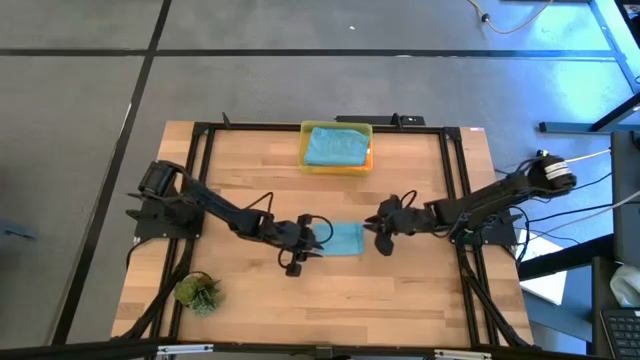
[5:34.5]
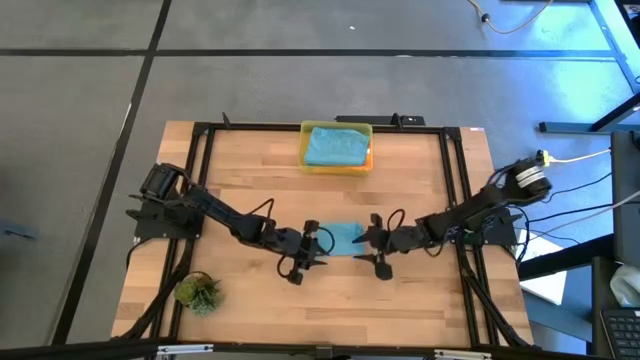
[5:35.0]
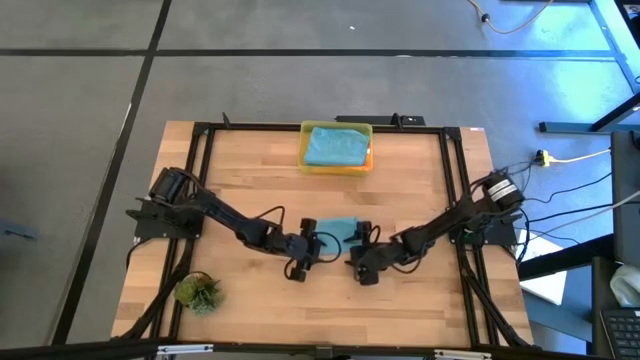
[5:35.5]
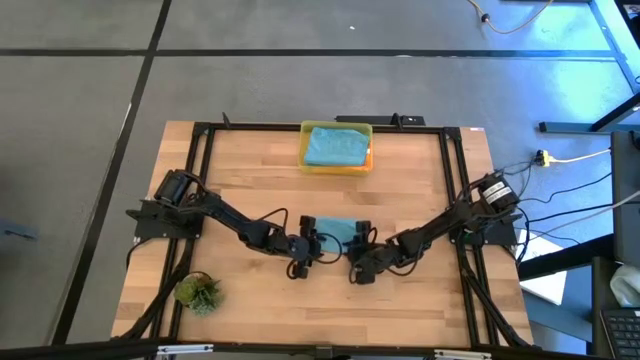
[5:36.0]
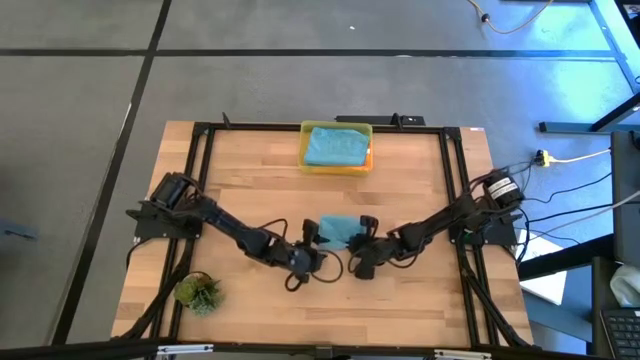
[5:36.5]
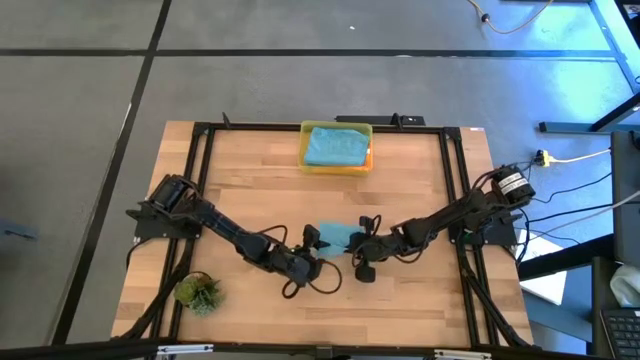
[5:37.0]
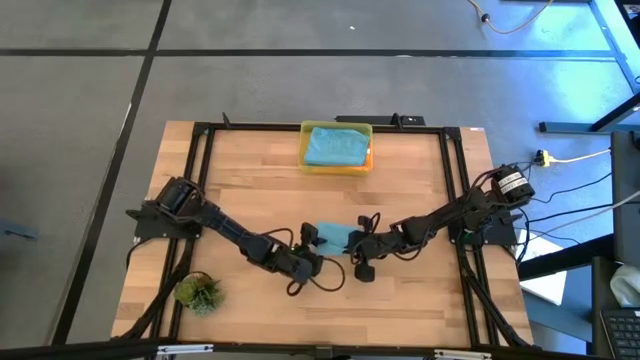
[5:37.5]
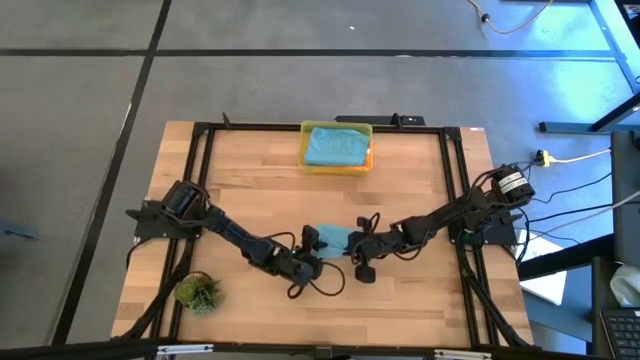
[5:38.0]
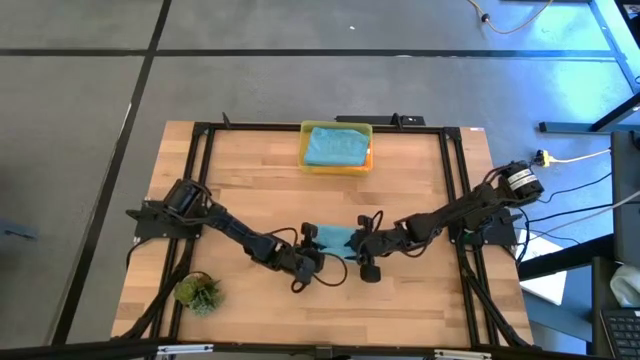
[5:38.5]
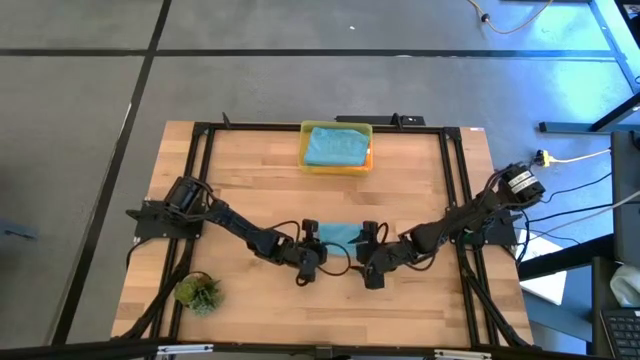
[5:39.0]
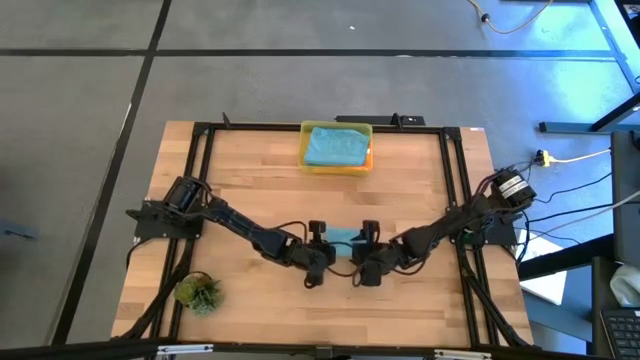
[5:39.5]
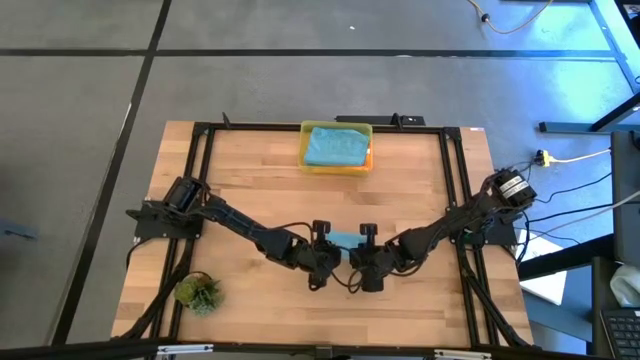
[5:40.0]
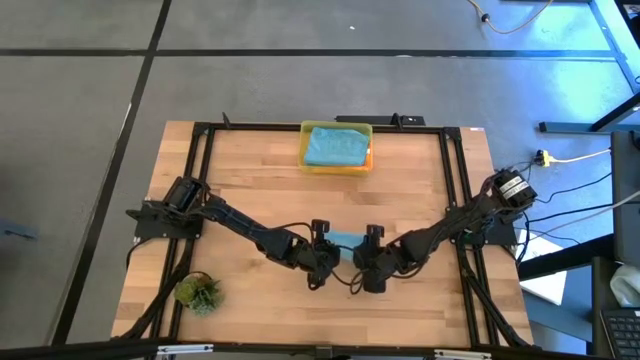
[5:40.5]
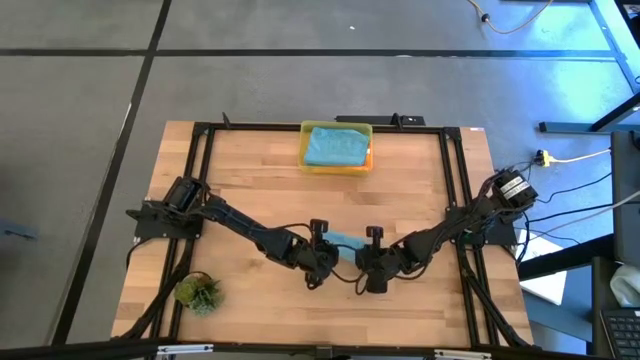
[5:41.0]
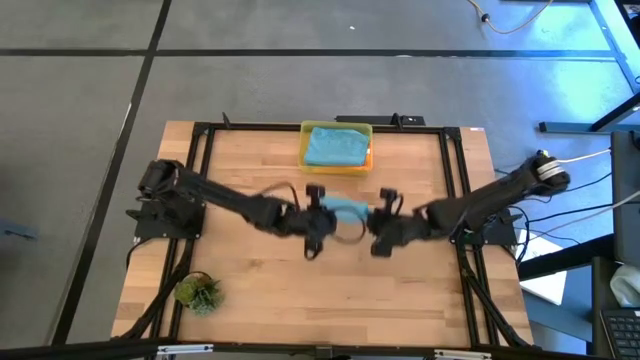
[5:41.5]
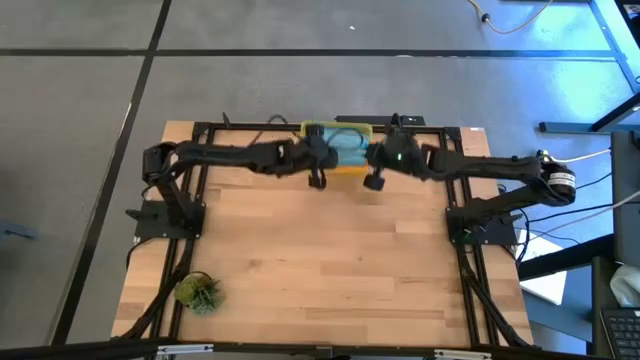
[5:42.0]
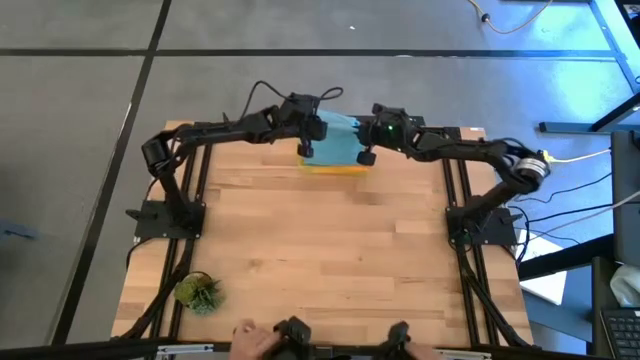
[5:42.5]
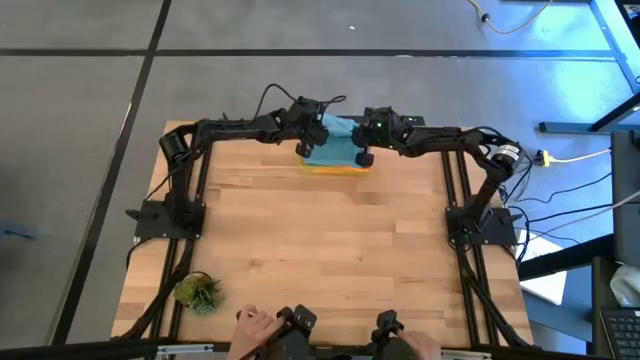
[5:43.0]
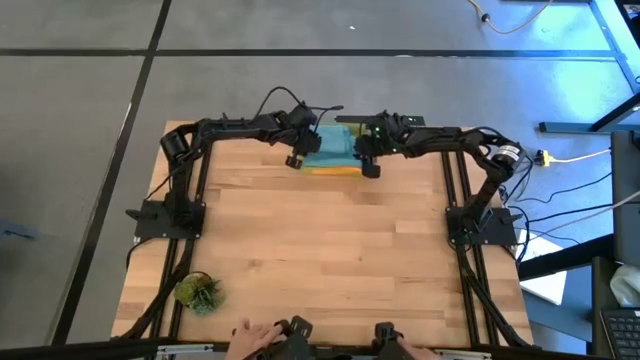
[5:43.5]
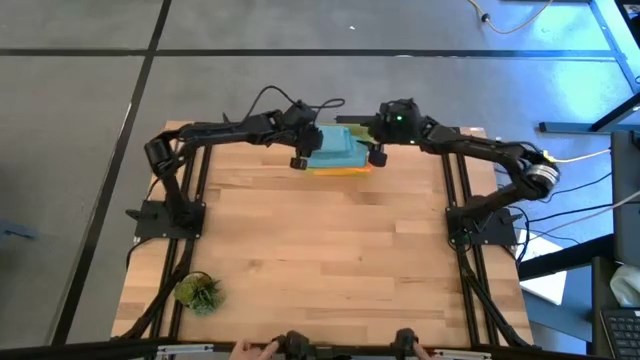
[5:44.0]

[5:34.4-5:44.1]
Task: Fold microfiber towels
Put the blue microfiber cloth into the yellow bin

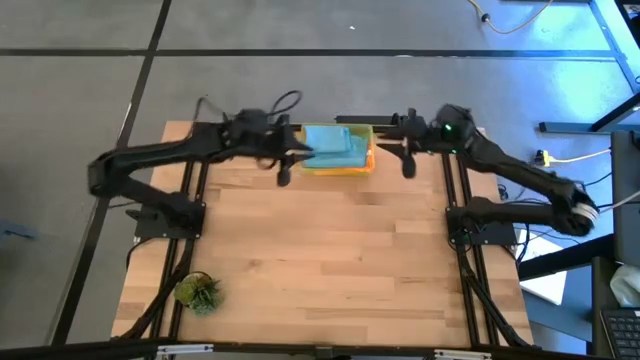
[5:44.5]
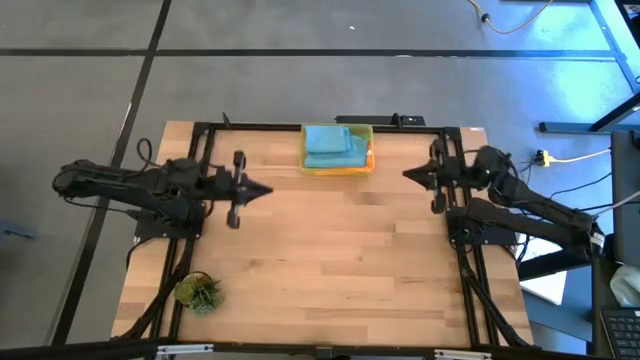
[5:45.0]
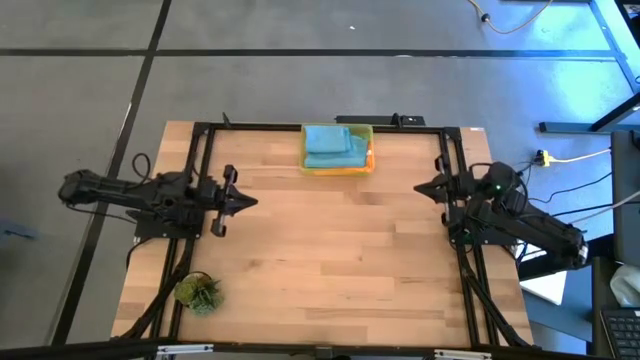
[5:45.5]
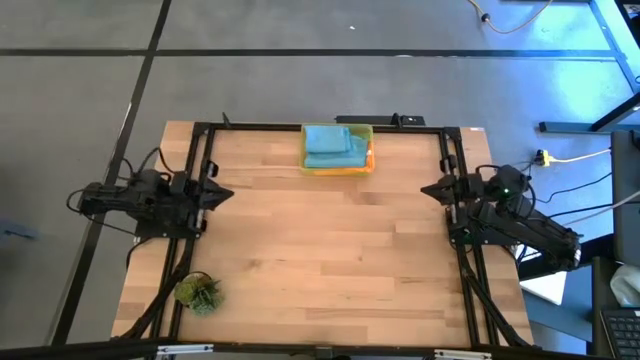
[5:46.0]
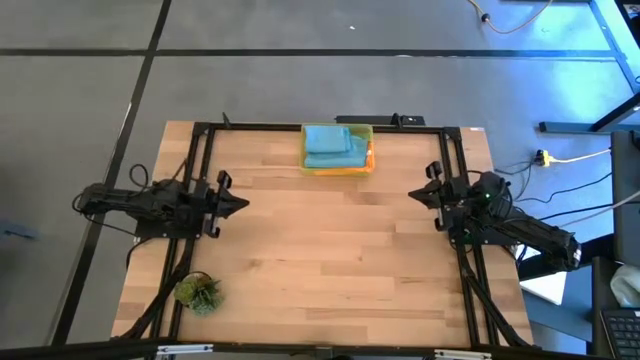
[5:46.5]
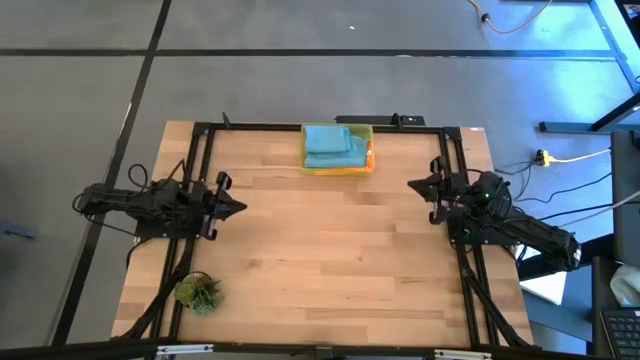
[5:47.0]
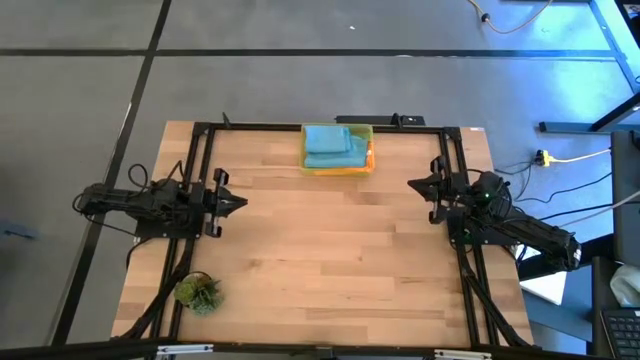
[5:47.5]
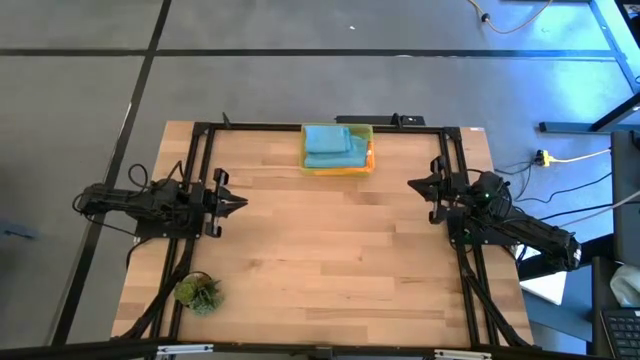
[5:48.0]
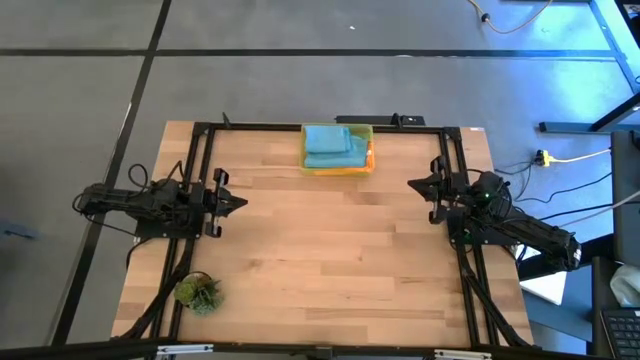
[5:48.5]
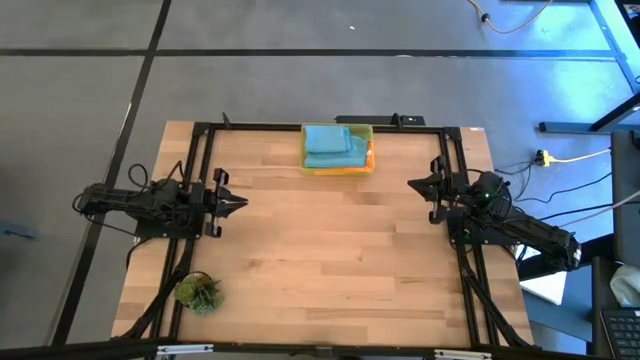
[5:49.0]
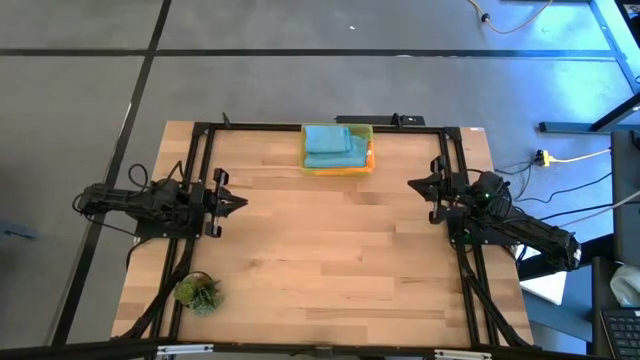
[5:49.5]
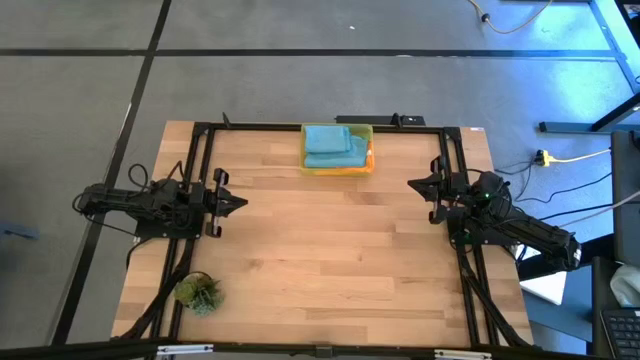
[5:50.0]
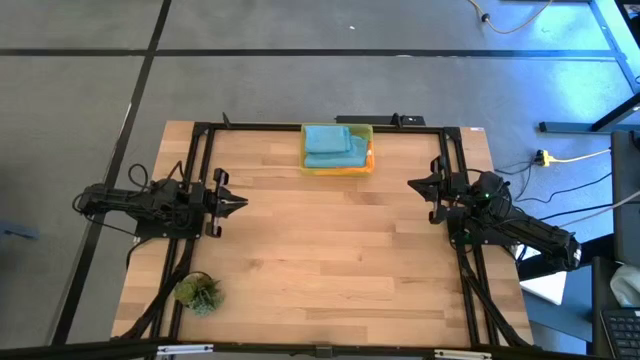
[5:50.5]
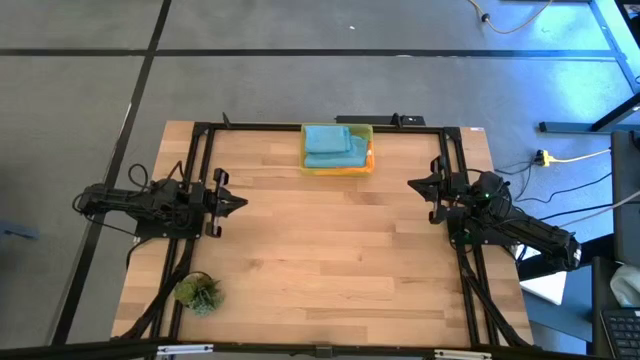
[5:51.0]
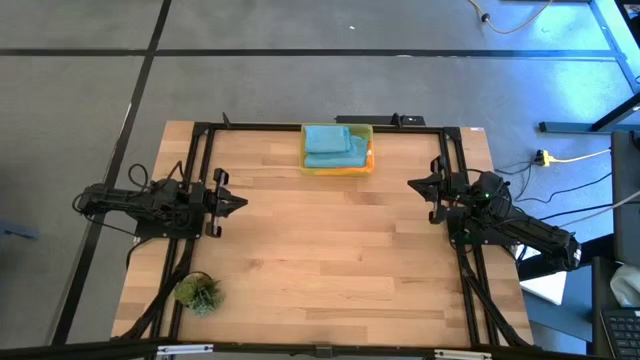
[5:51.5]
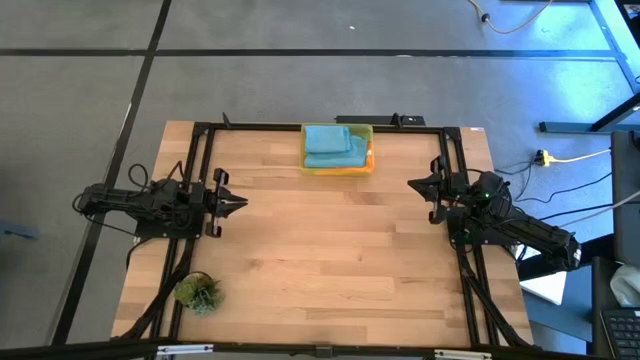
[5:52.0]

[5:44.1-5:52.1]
Return to Home Position

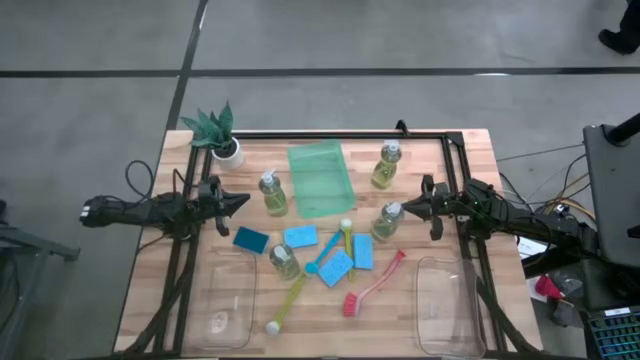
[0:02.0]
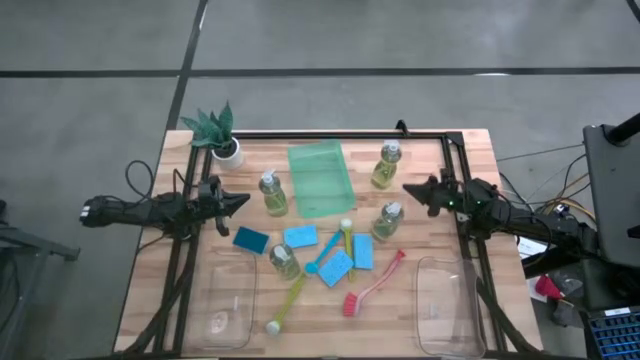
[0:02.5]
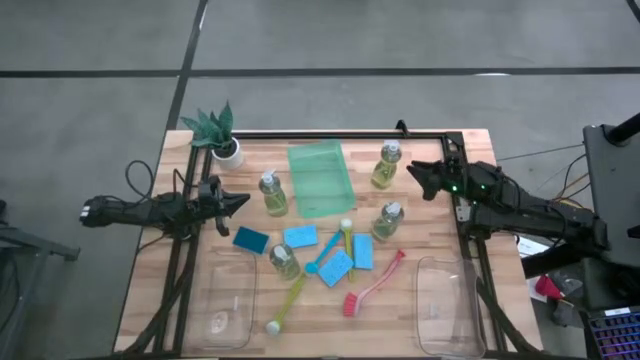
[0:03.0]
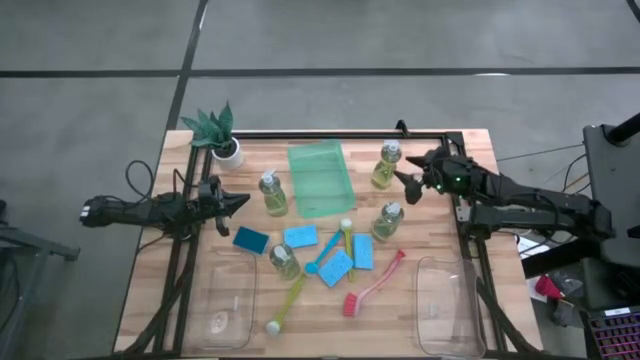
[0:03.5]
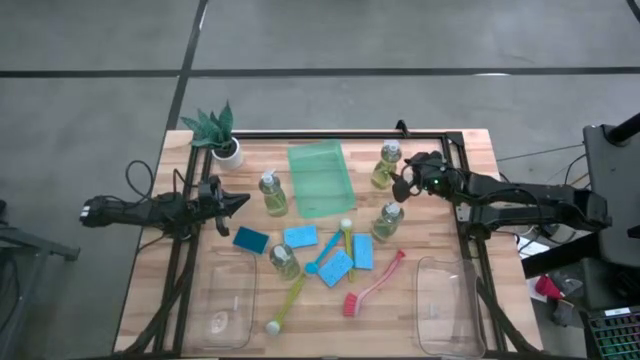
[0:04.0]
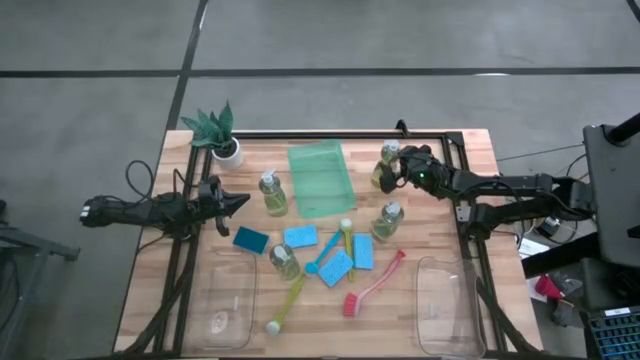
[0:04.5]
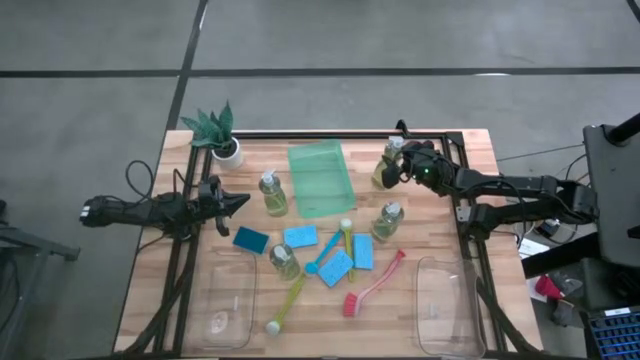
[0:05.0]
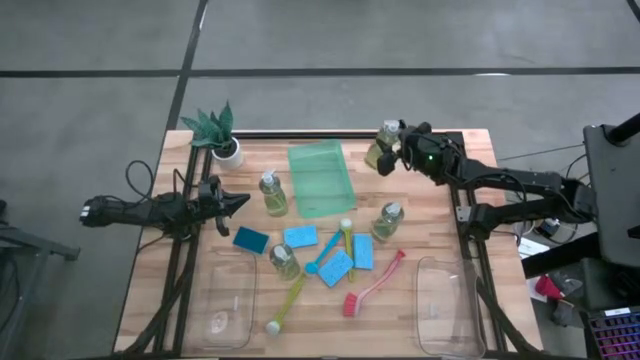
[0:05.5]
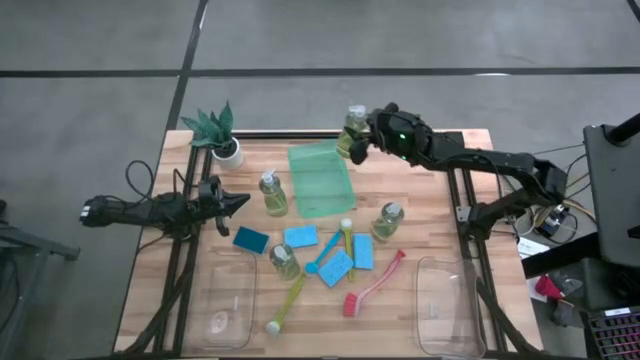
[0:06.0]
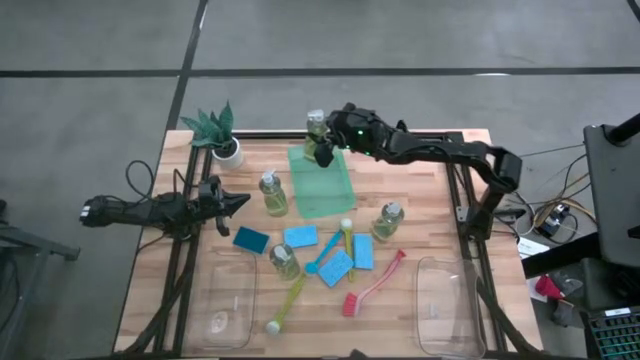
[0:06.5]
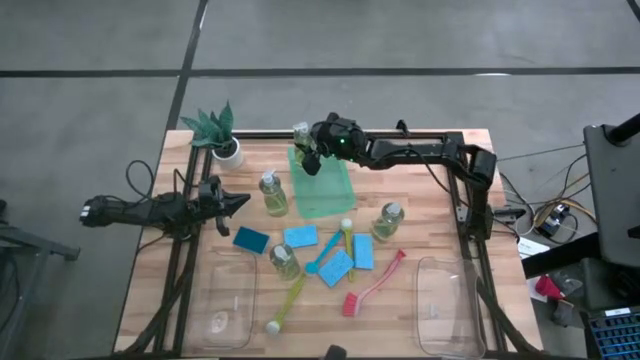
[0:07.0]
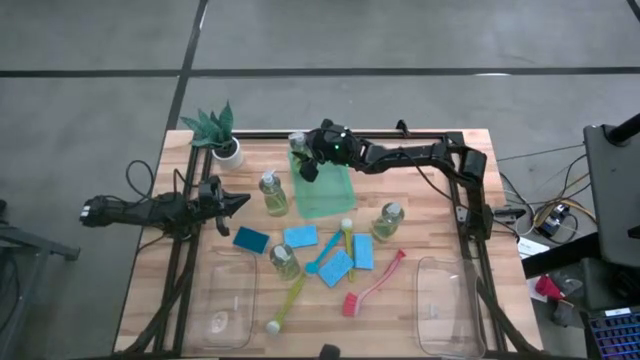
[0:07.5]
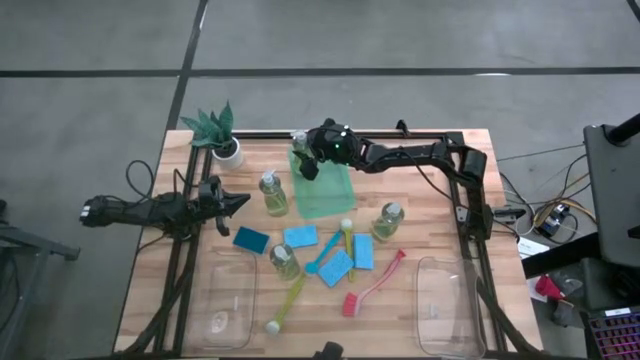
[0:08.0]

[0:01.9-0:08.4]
Task: Pick & Place Kitchen Sink Supplies
Put the green soap dispenser into the green bin
